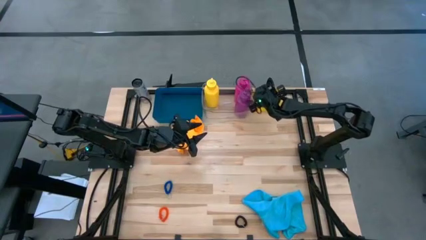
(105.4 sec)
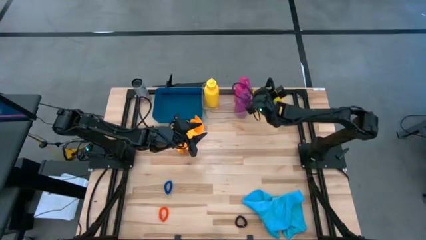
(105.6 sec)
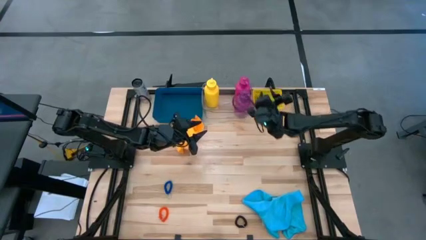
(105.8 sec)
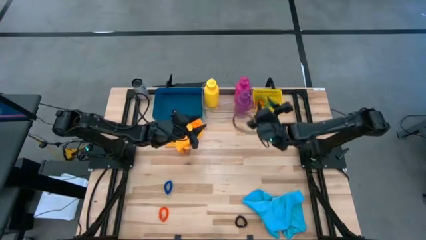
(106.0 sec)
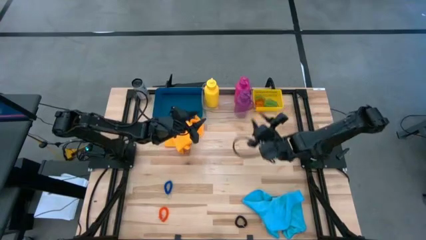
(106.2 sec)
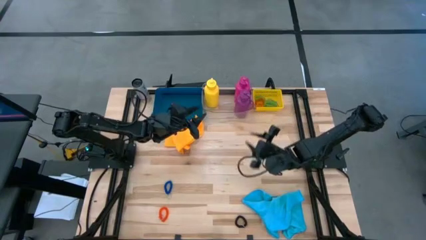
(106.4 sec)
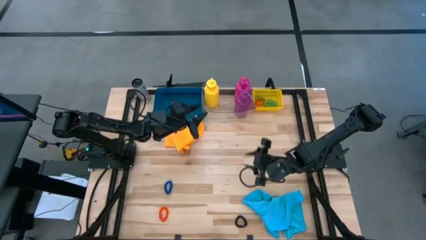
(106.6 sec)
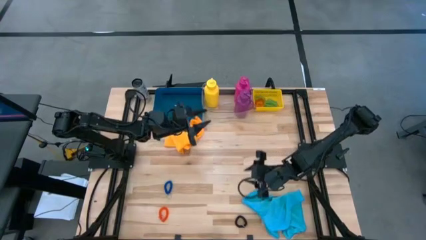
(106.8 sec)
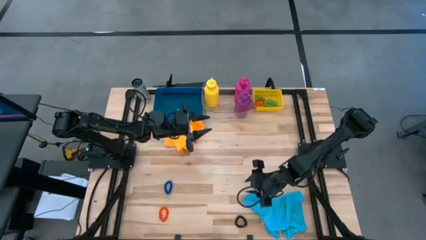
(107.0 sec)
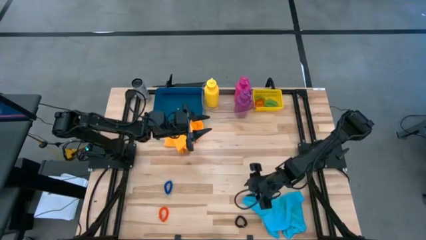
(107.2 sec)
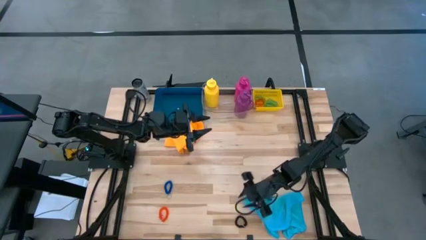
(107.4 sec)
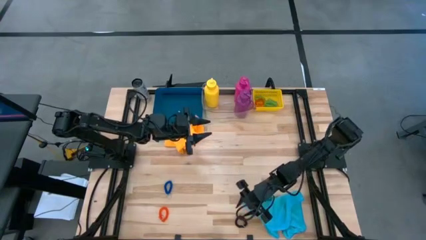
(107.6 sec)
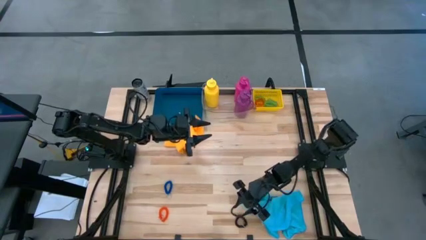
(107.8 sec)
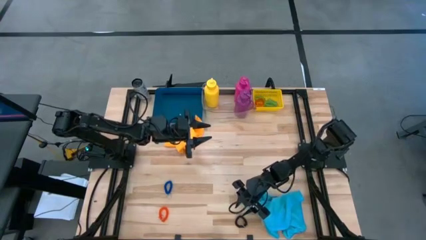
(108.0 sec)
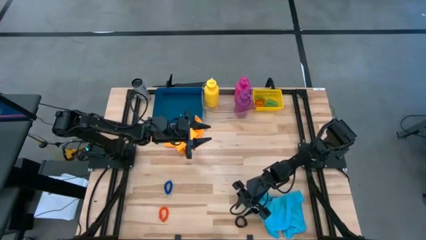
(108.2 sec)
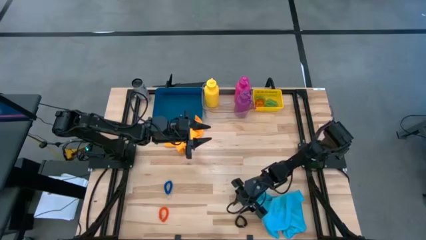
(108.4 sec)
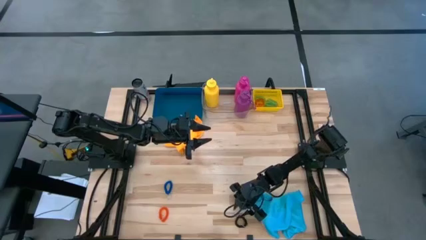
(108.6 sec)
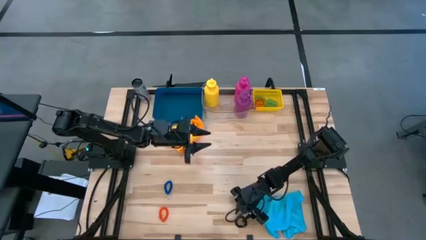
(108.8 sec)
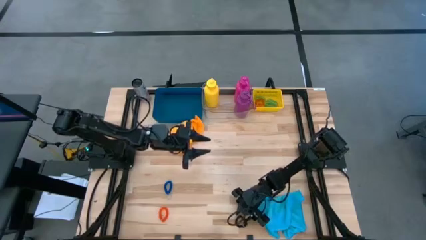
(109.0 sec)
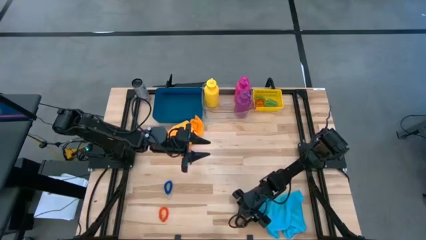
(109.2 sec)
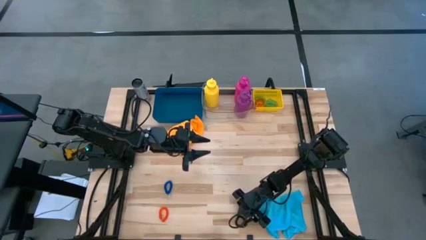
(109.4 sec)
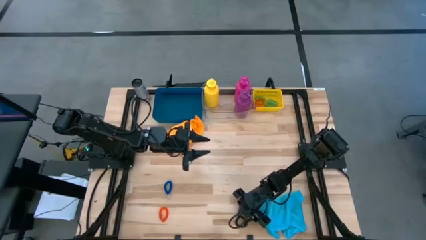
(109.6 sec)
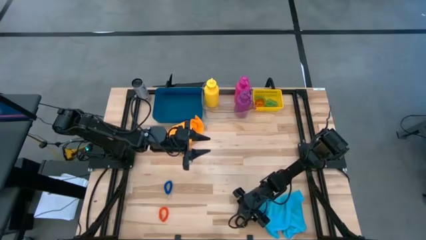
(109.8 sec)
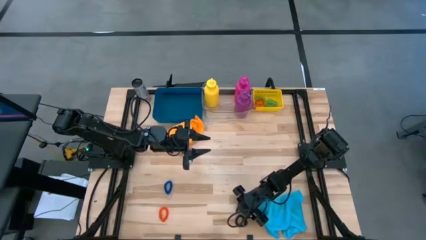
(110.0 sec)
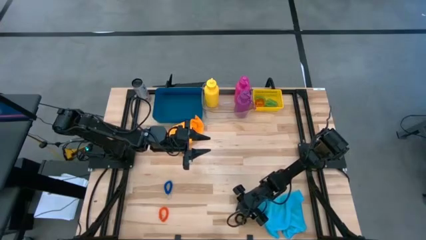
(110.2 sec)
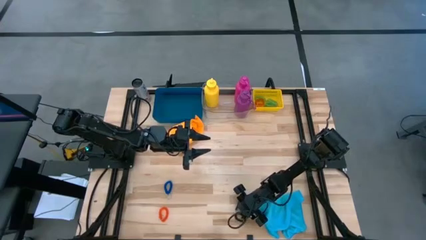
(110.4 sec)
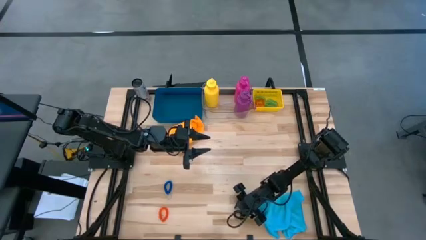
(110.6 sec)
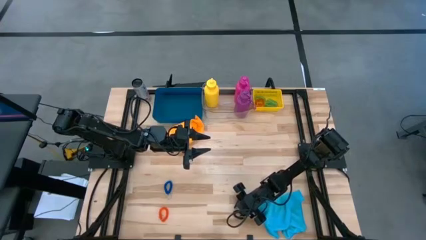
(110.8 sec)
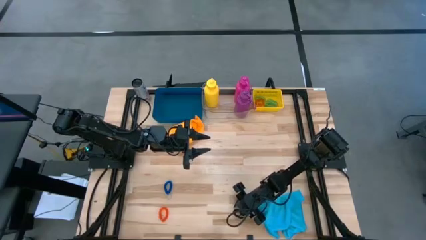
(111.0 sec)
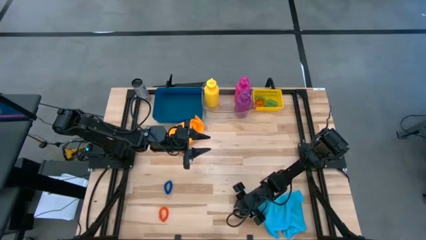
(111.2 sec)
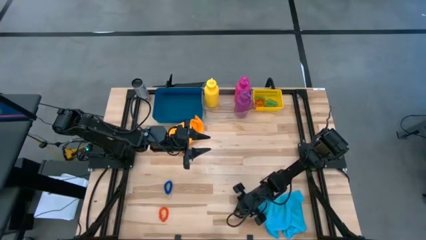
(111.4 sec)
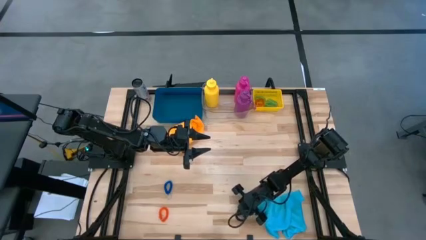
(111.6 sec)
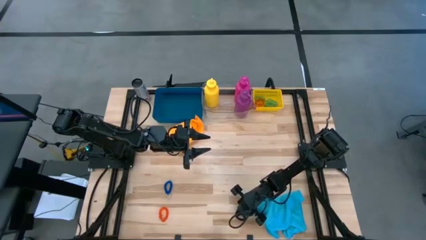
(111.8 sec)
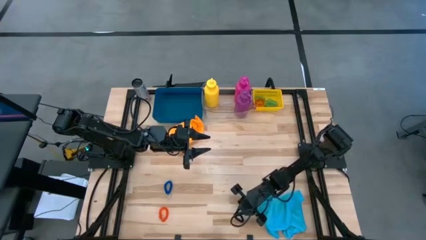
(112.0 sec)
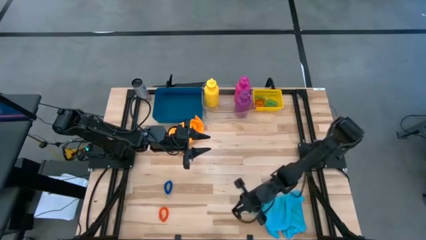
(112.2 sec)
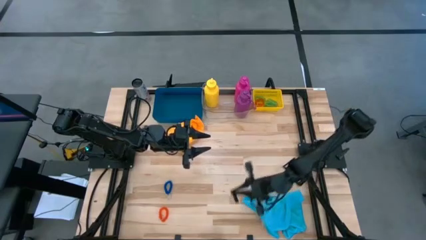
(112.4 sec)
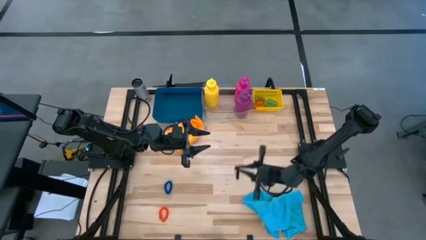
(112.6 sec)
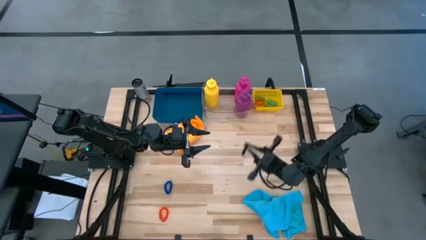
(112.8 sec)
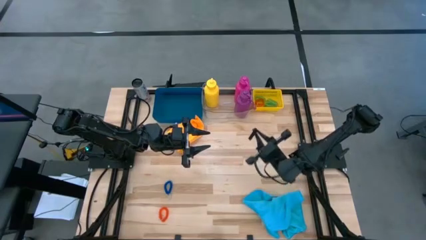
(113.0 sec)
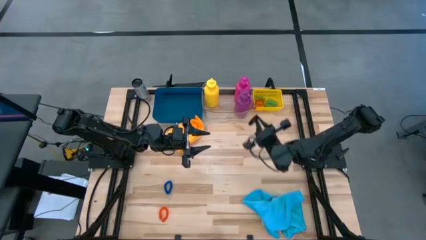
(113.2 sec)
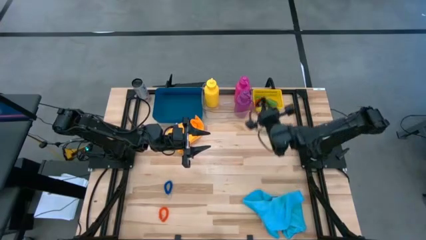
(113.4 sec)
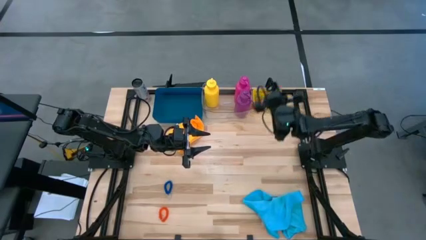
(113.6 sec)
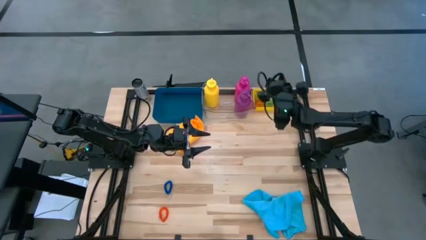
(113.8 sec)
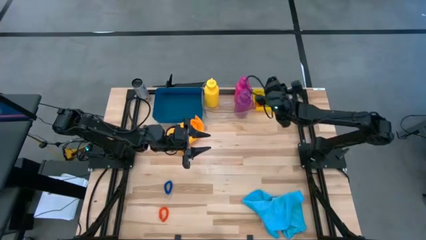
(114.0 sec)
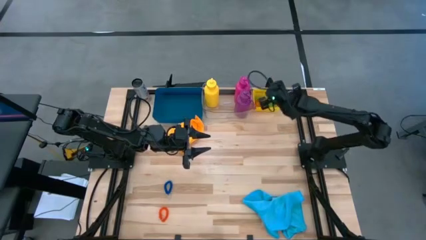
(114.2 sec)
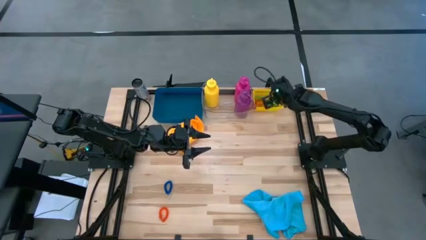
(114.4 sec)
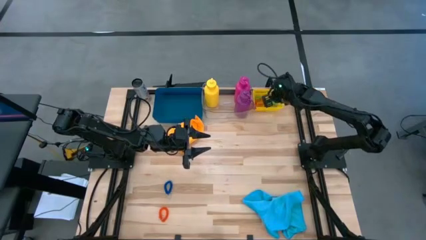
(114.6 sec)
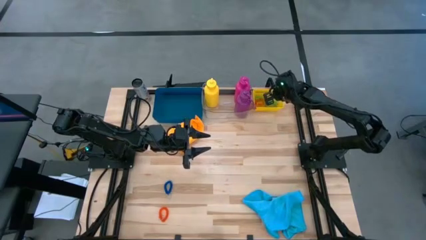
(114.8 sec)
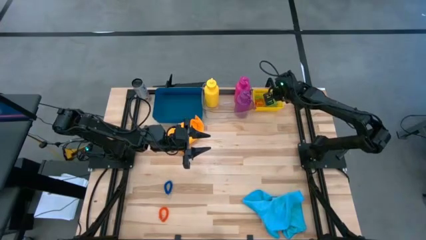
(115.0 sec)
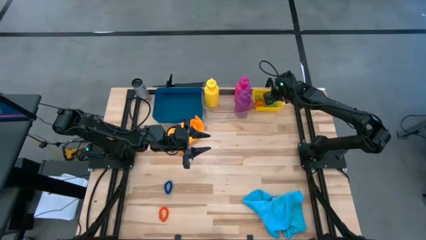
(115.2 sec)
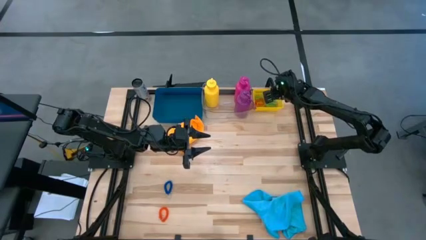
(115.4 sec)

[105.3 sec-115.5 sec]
Task: Pick & Place Sports Items
Put the black spring keychain into the yellow bin
